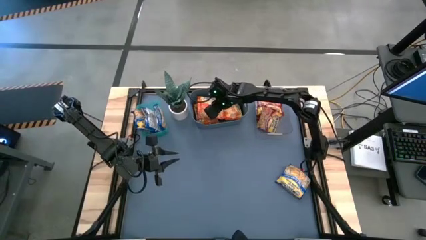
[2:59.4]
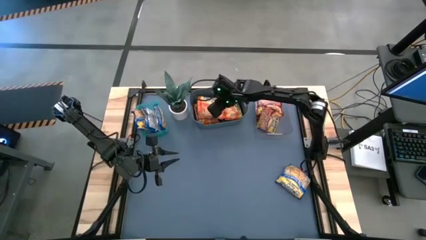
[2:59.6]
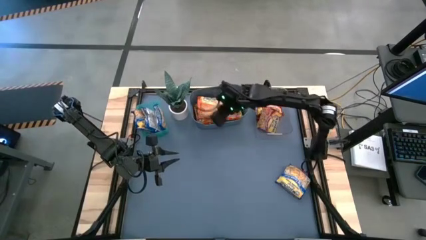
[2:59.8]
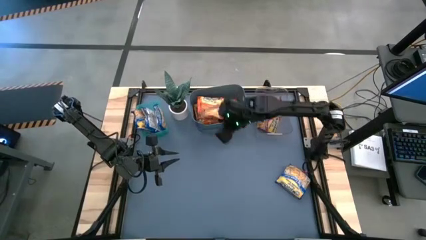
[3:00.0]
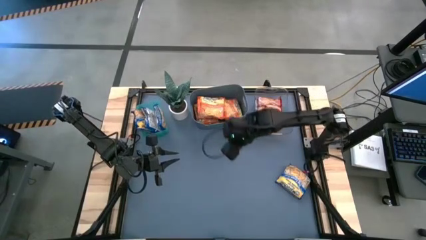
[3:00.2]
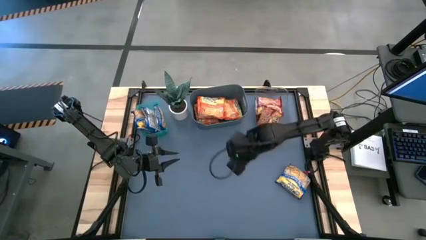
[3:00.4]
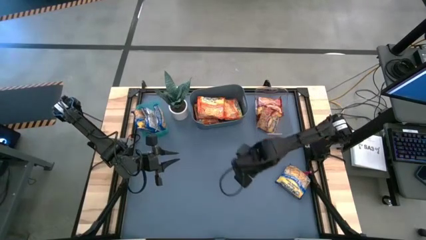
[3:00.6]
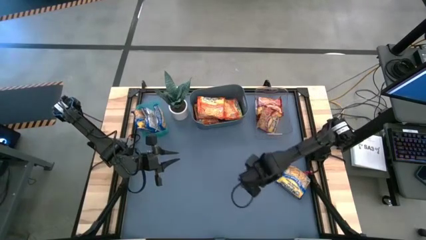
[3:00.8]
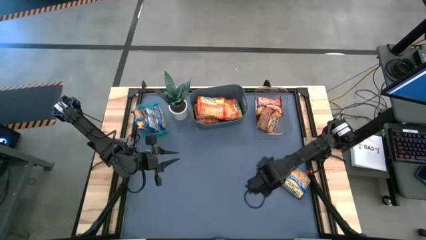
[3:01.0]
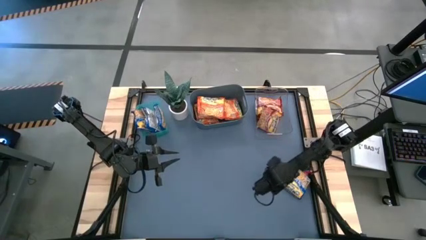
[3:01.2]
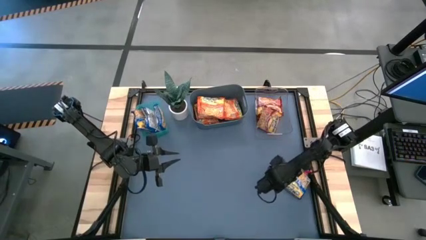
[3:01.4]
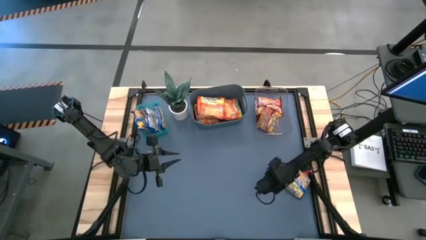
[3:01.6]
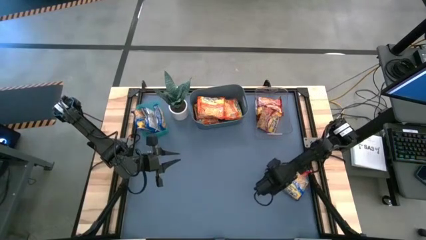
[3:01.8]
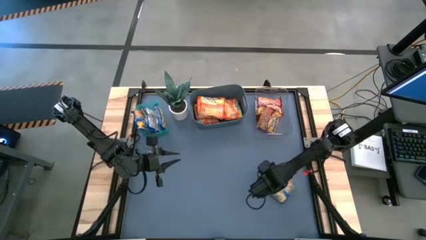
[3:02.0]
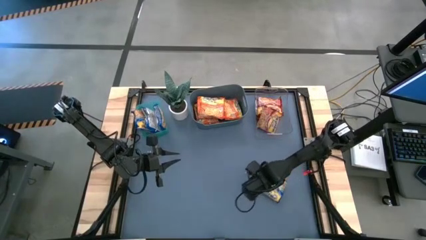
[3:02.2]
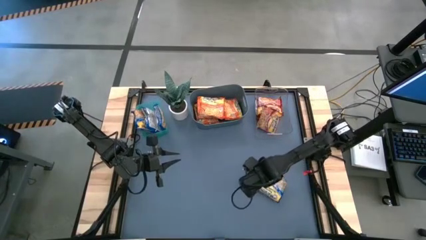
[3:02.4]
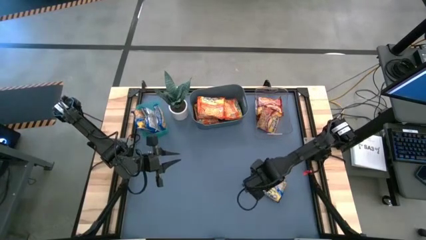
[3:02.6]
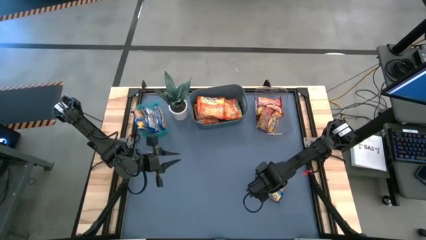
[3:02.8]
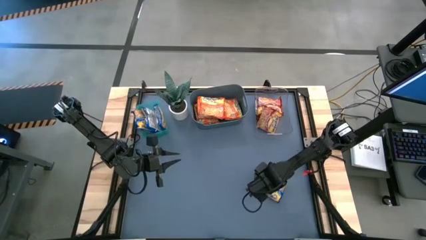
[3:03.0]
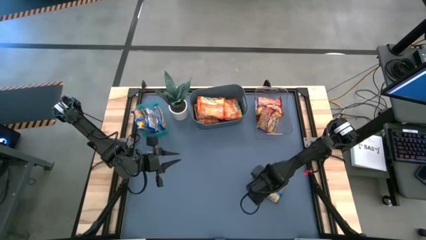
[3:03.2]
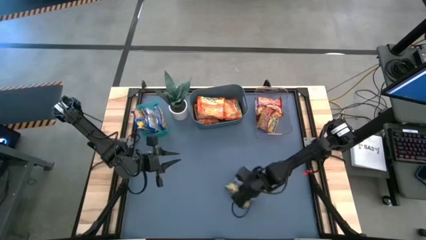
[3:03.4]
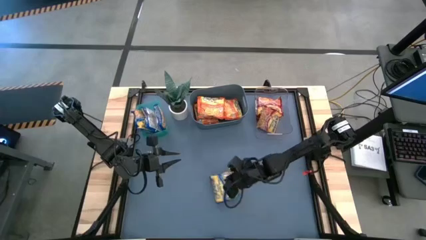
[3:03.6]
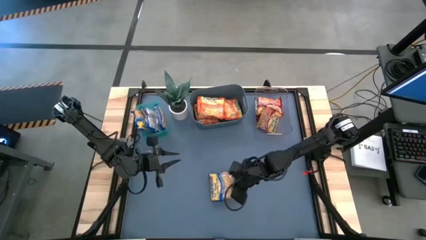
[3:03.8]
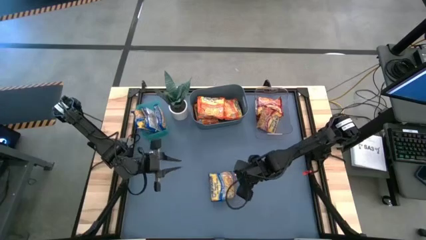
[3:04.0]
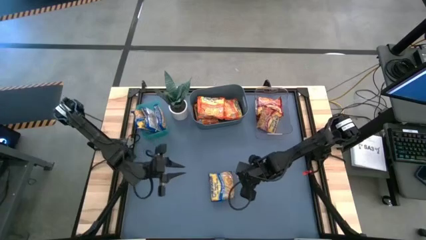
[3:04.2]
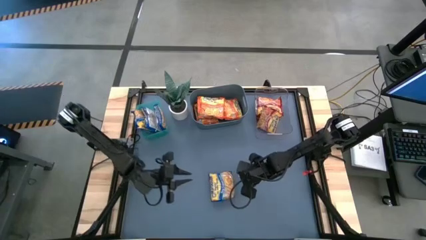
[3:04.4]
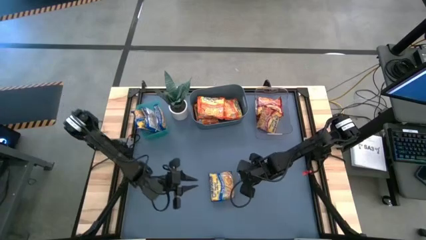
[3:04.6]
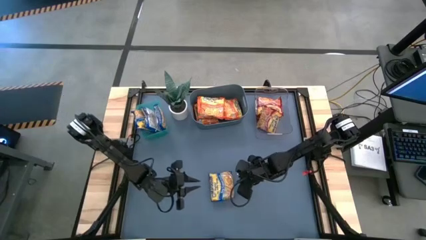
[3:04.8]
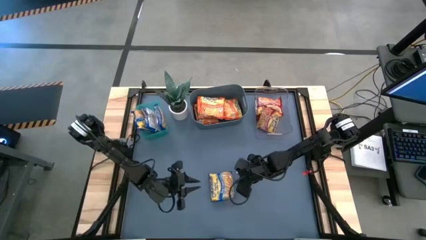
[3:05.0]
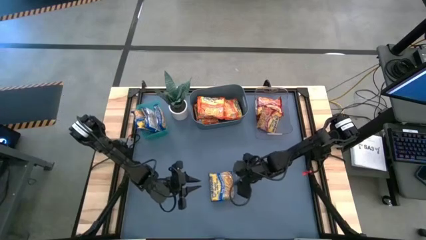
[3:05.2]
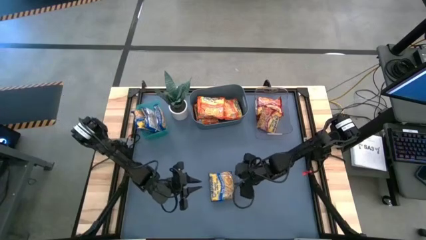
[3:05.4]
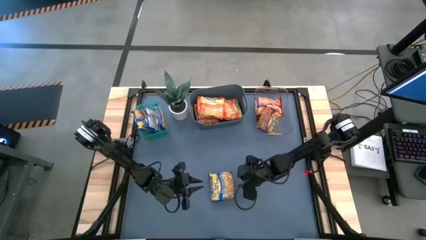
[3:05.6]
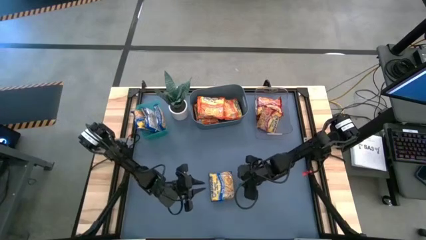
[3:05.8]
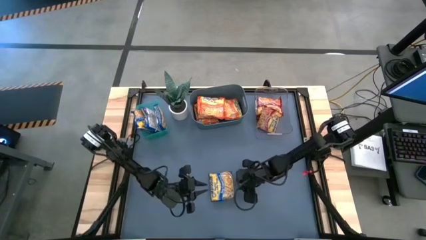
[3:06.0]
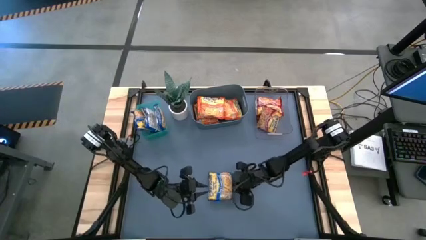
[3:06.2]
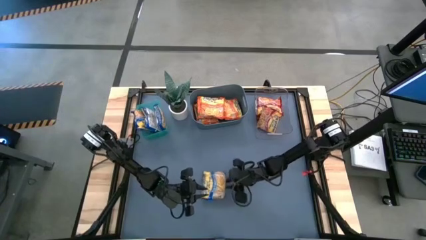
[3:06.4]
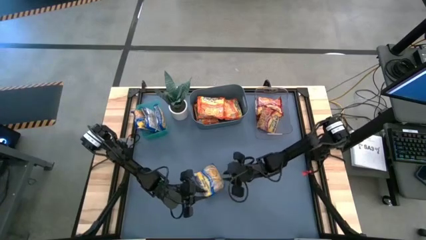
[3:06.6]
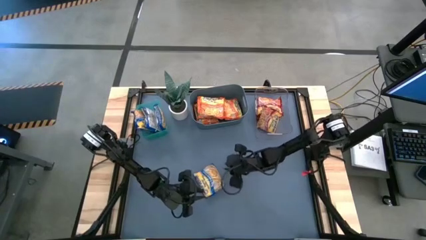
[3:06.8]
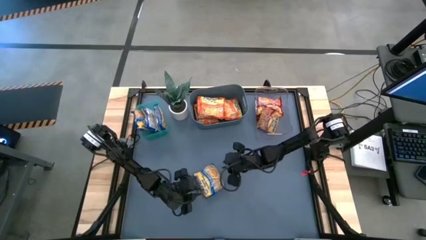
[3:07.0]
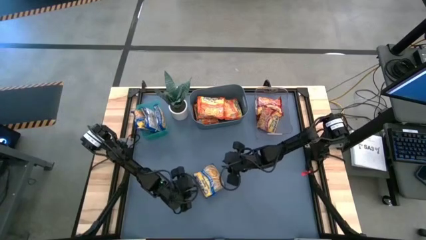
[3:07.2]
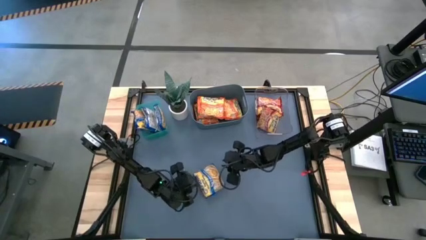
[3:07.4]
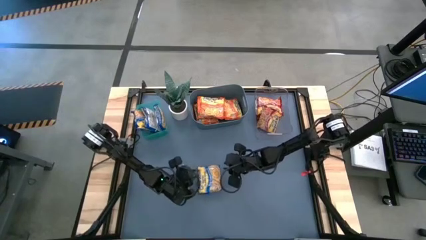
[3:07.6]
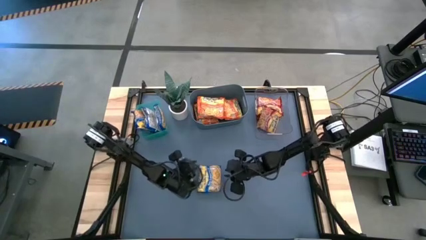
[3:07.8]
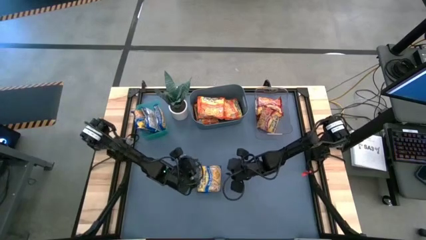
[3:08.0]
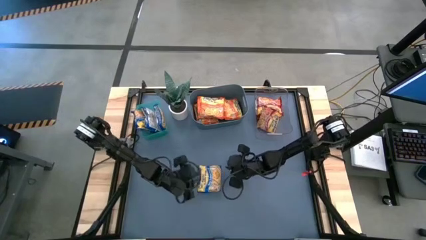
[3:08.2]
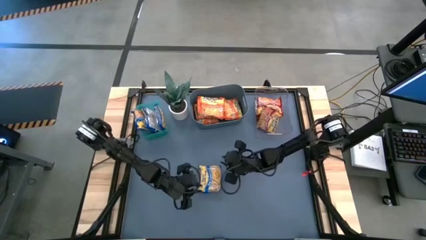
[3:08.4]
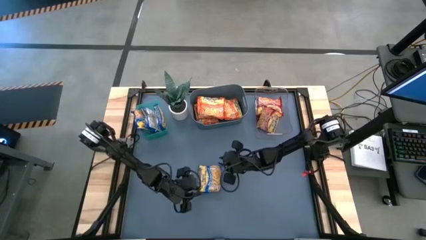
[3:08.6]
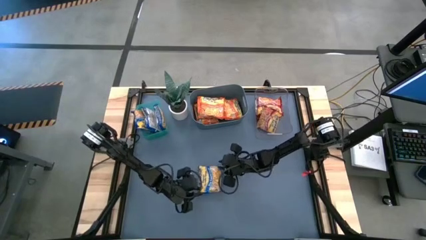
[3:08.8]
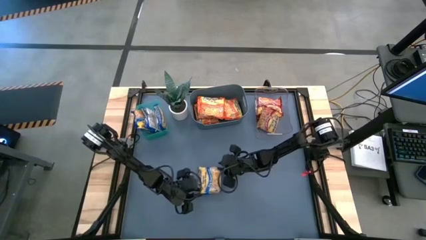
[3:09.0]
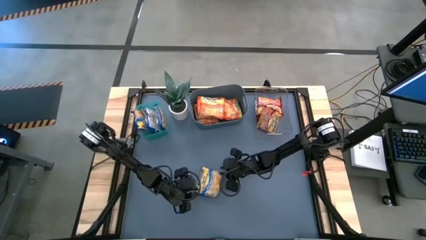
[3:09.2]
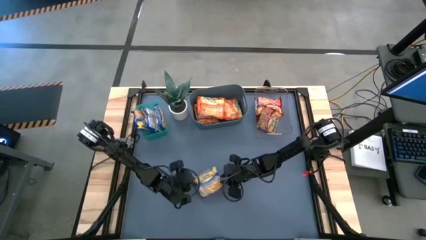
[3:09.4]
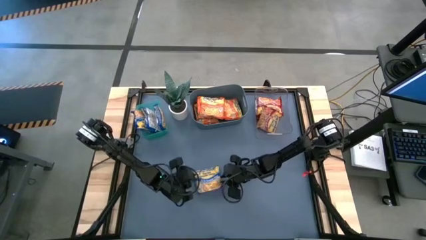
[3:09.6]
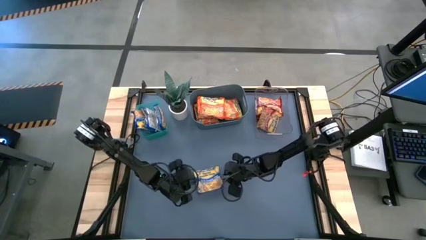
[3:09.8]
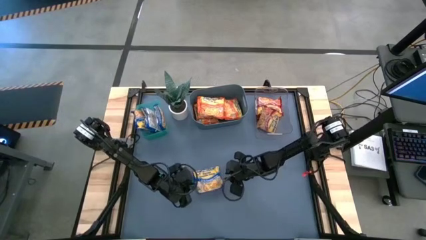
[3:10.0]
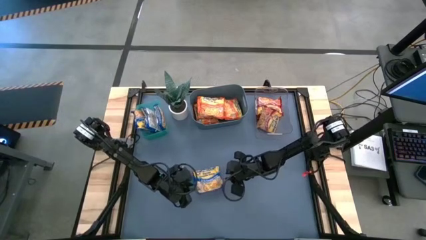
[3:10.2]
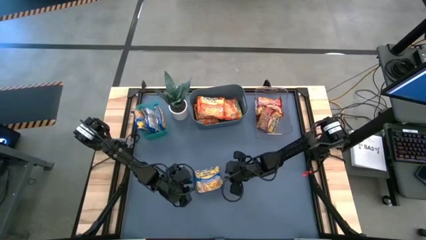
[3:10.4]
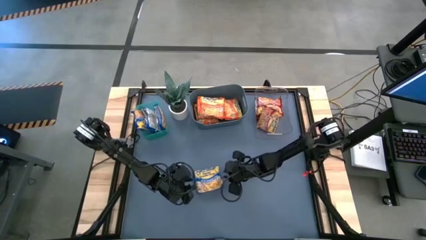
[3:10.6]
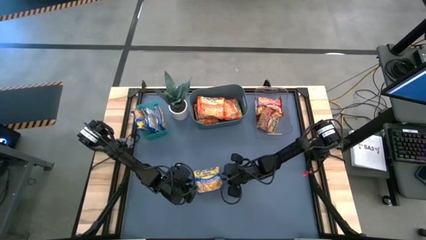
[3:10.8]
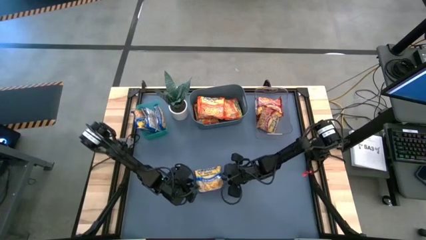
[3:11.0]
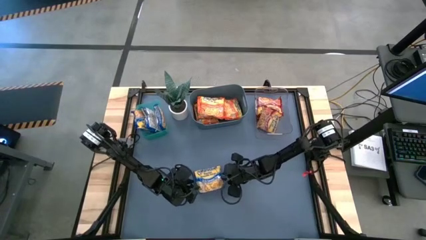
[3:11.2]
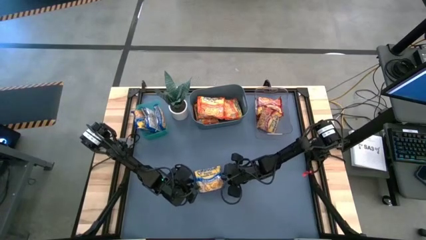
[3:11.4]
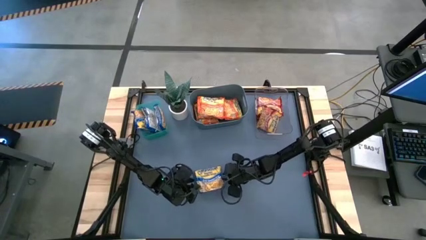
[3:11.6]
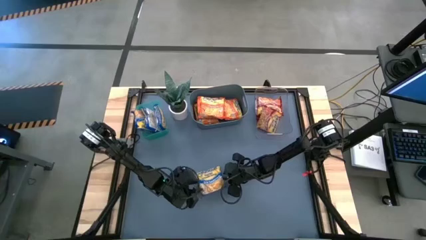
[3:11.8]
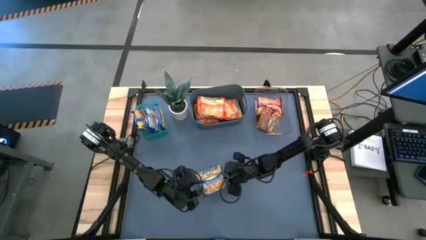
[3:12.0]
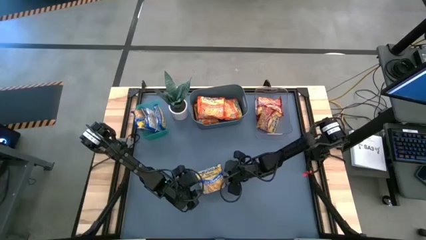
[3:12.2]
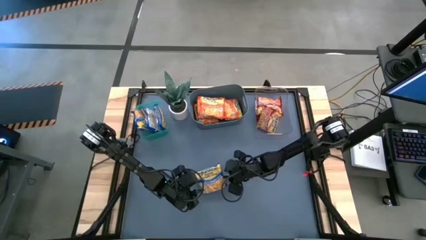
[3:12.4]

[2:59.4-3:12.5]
Task: Sort Maruchan noodles
Put the blue noodle pack into the green bin

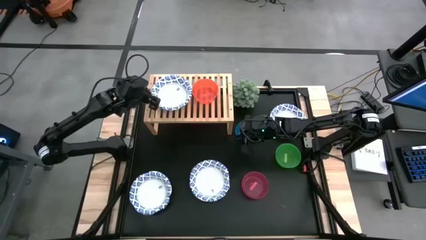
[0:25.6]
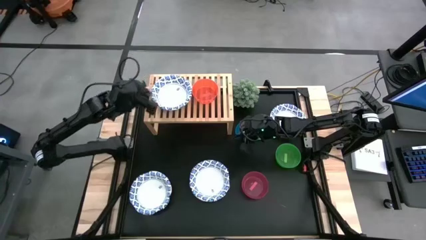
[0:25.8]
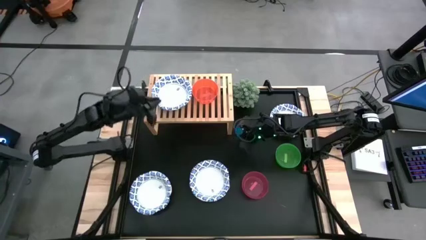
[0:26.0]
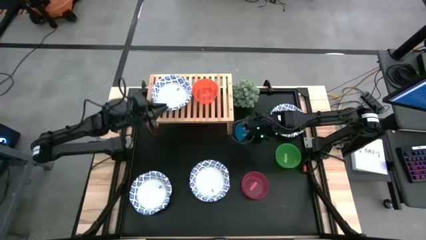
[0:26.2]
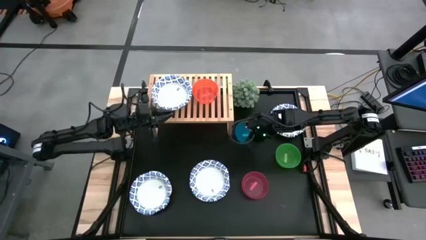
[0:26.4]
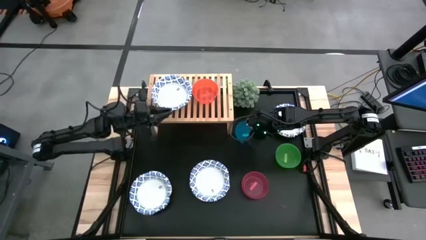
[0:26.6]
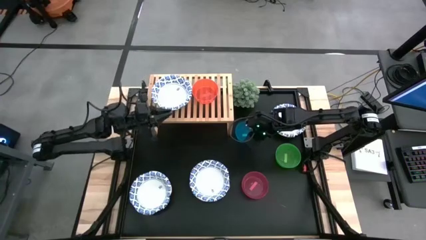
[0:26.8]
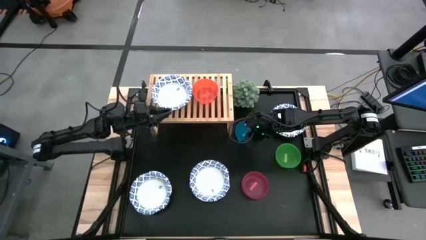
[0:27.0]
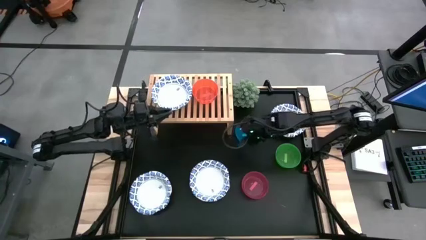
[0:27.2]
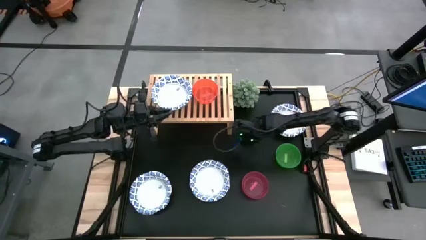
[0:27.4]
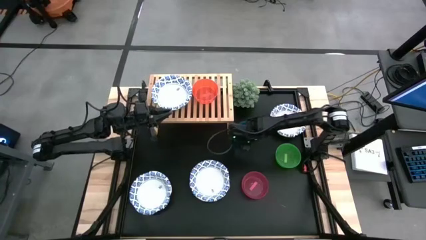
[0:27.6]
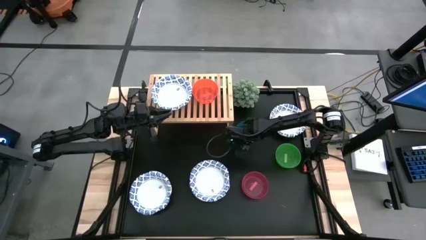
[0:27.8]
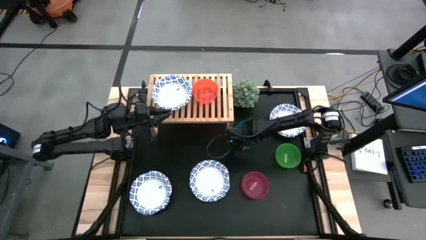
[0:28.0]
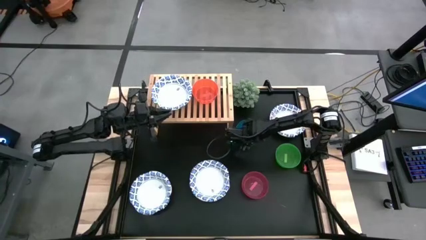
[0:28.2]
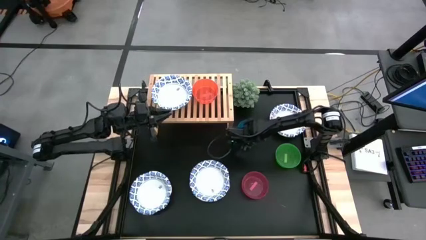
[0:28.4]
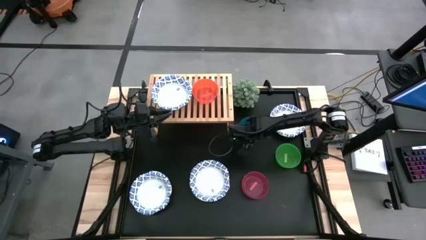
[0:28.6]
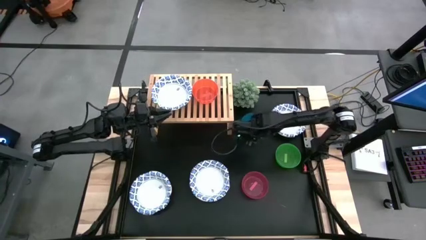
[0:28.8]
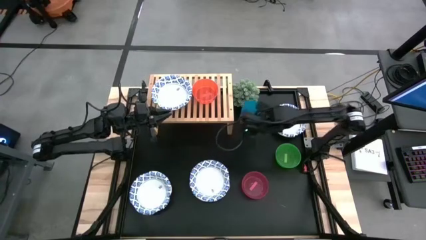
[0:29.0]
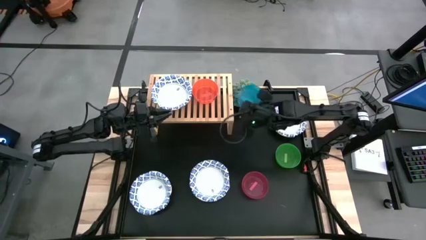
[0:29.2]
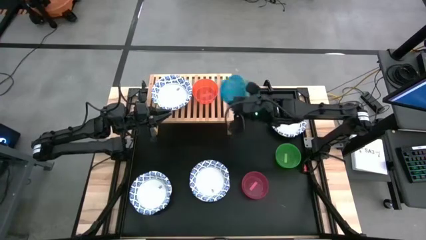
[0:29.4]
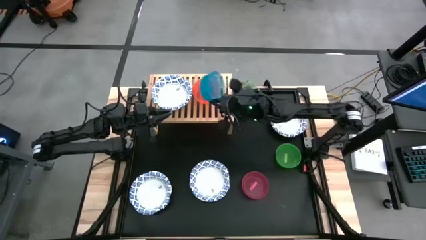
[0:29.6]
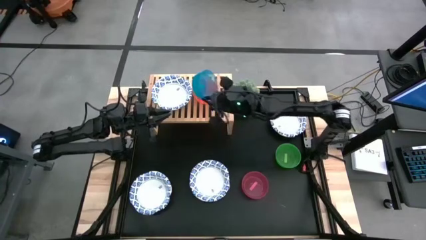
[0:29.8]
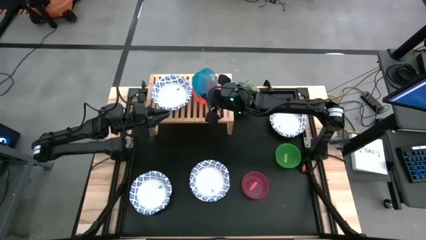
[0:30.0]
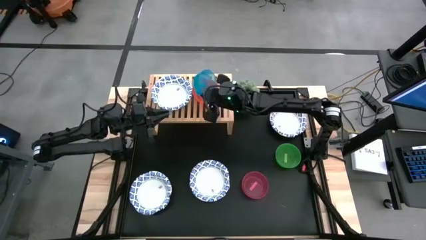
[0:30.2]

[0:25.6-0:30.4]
Task: Place and stack bowls onto a shelf
Stack the blue bowl on top of the orange bowl on the shelf
